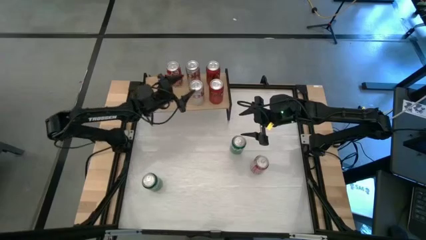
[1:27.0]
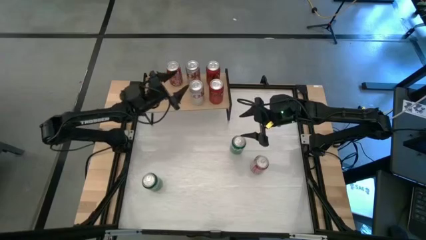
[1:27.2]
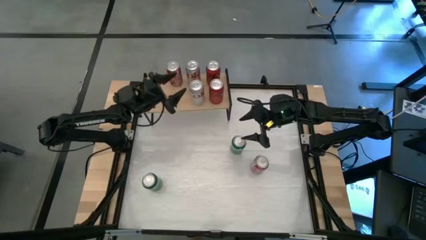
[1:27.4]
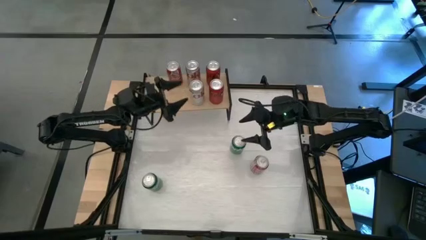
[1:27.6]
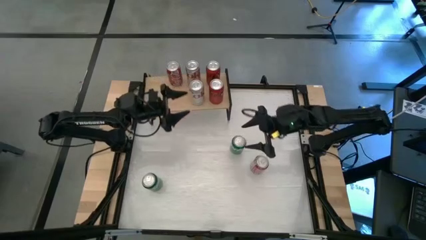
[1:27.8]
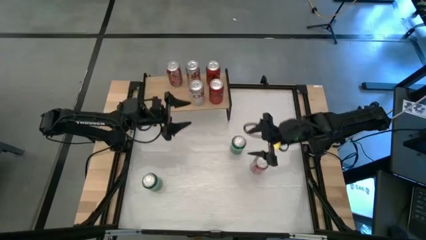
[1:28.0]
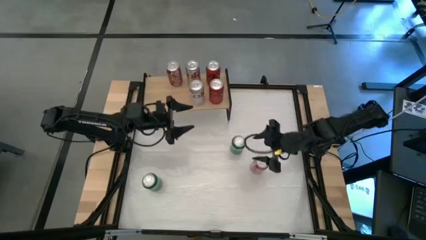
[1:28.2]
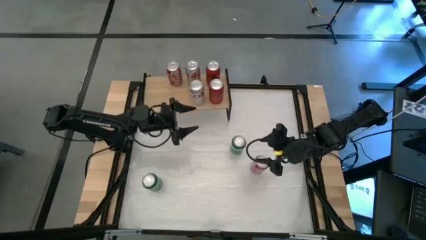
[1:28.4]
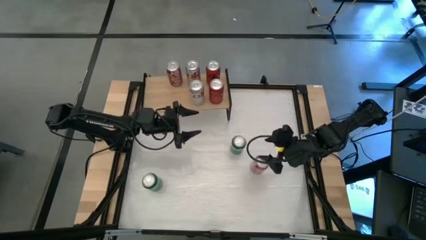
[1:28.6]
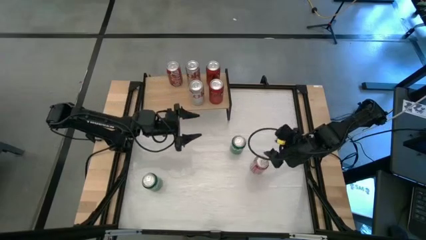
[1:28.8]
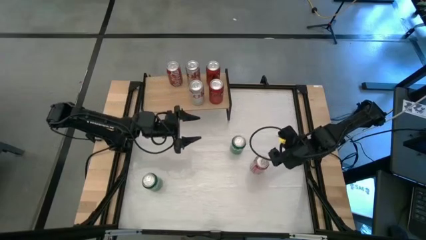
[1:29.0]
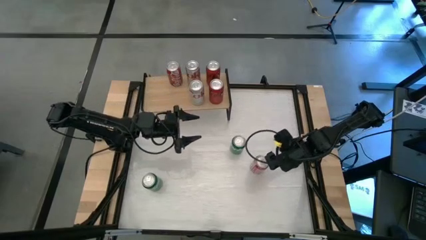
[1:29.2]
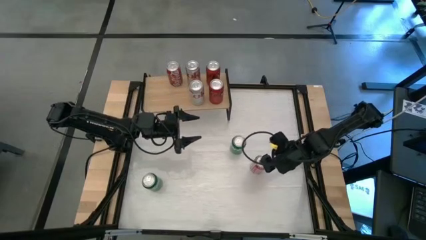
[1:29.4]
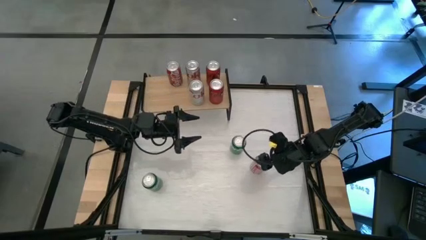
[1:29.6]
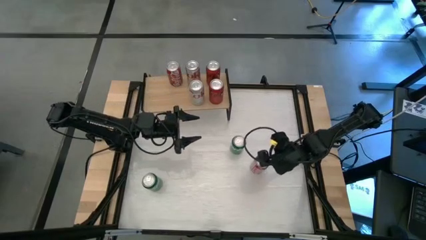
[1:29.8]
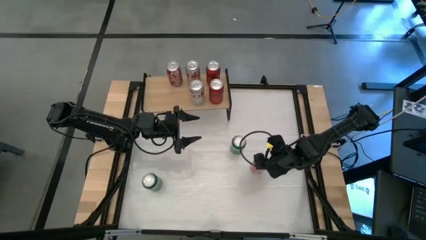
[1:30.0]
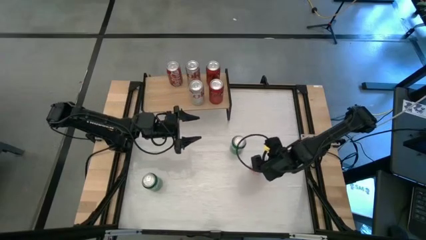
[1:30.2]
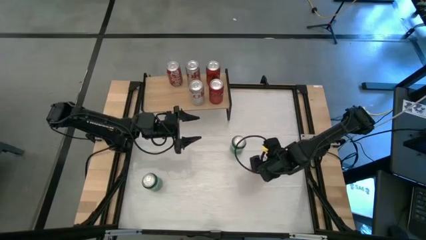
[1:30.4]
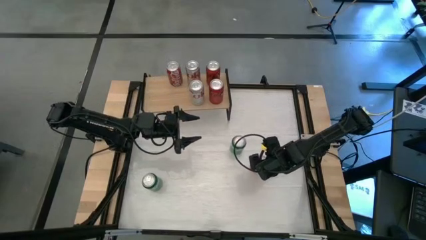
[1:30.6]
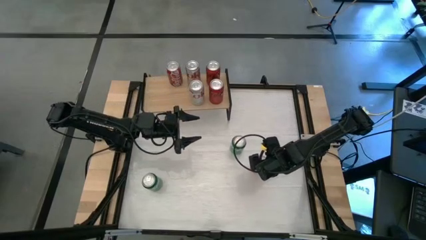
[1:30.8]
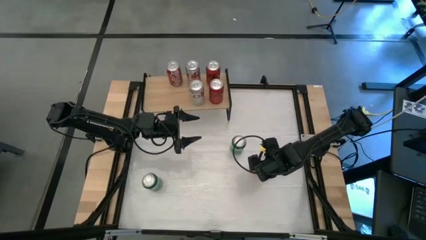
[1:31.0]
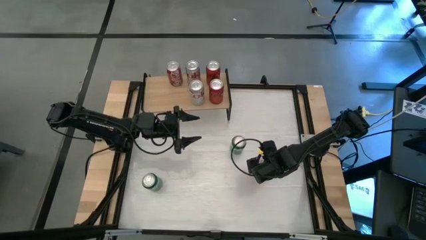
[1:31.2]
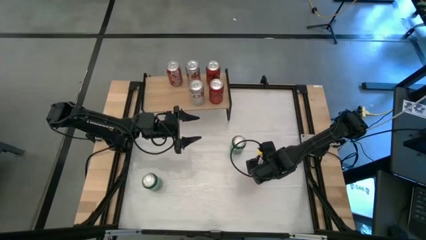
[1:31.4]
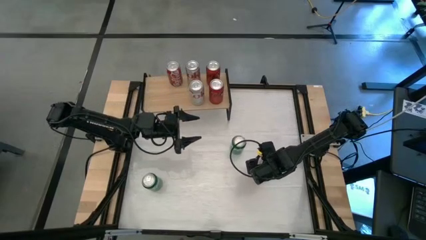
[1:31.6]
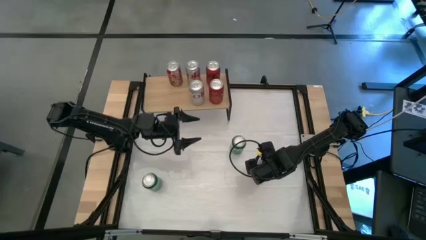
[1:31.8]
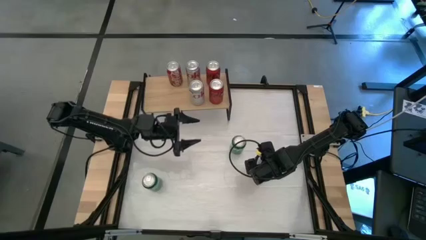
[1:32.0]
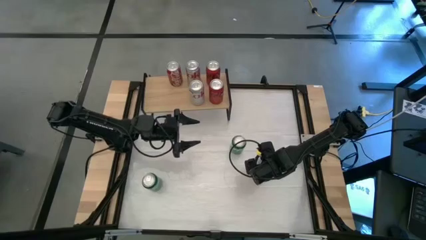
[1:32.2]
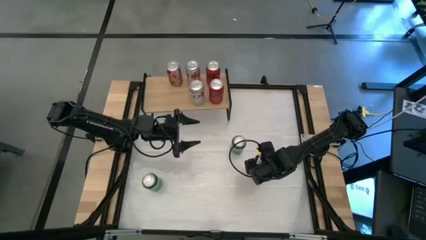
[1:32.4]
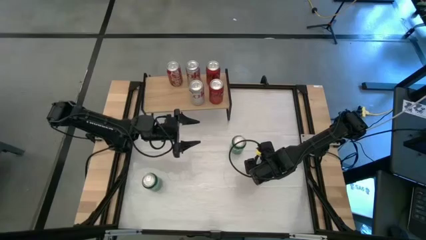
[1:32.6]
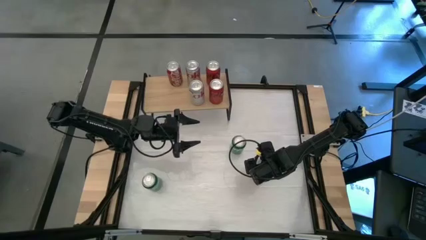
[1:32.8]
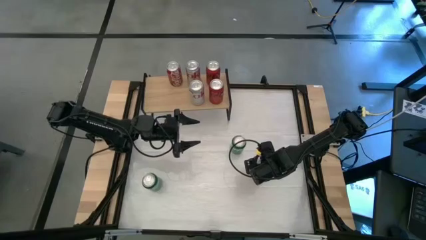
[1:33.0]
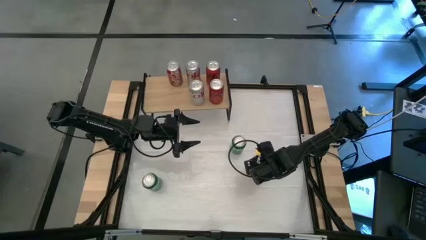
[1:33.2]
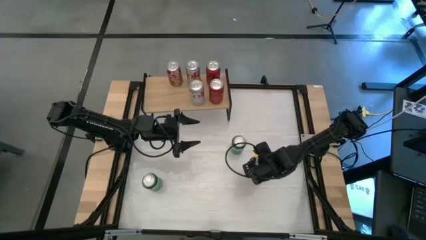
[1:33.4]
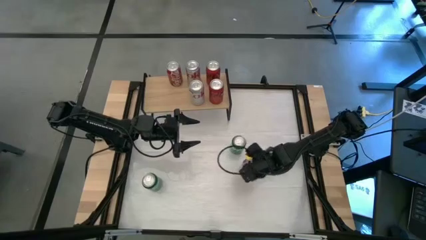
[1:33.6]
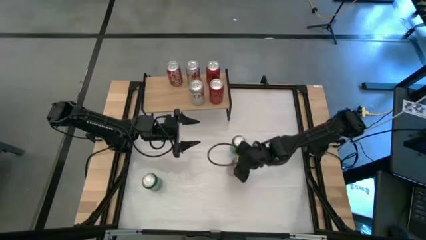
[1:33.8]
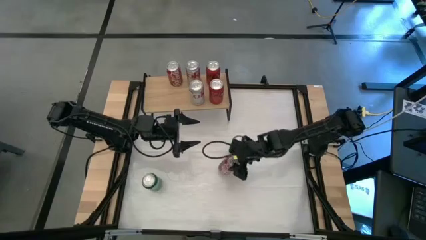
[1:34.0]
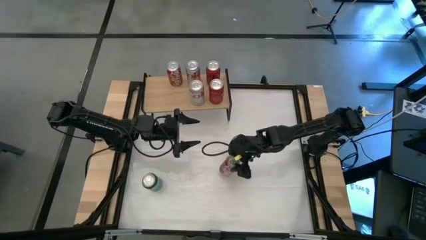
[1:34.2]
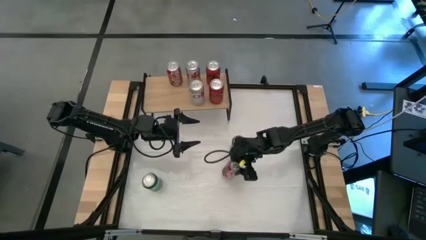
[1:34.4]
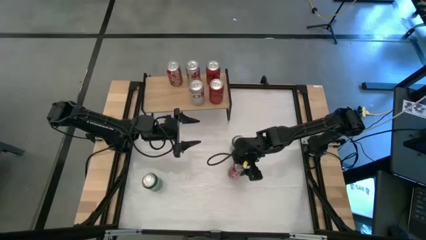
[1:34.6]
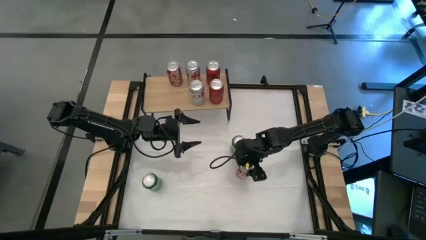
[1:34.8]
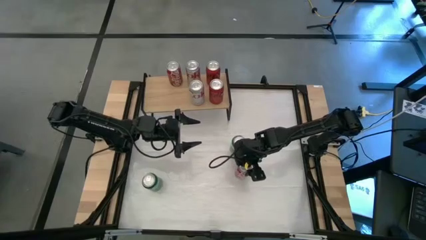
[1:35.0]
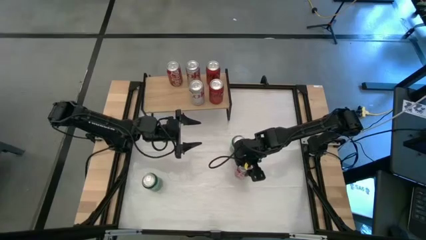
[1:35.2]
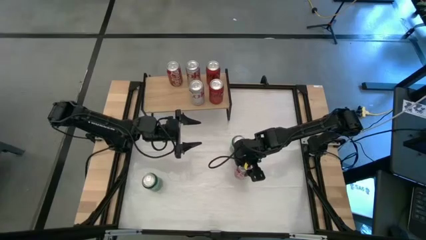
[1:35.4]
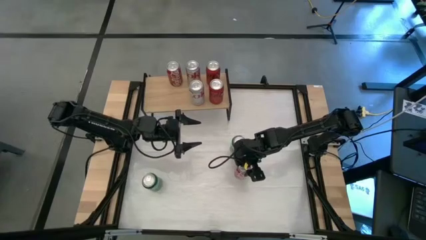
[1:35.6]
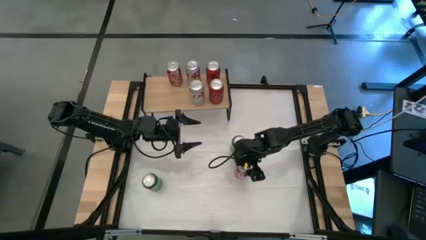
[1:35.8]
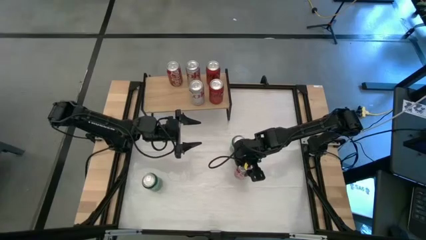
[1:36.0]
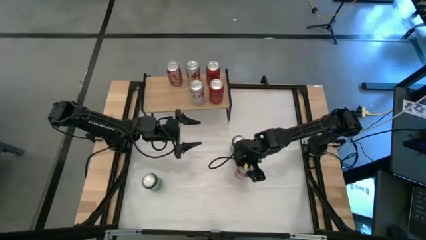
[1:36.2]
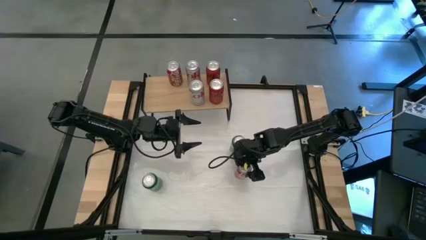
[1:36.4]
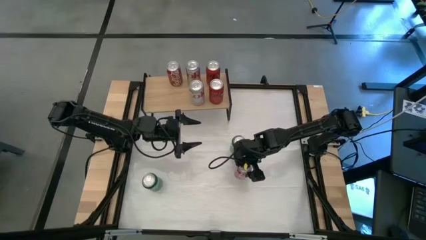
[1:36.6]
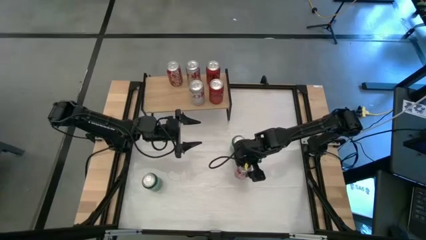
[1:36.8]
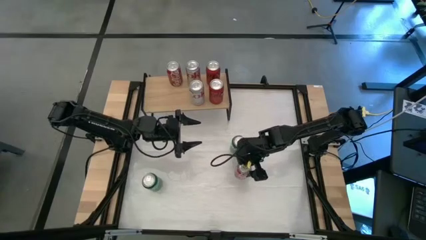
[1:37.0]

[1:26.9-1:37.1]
Task: Place canned beverage on shelf
Move the red white soda can to the center of the table

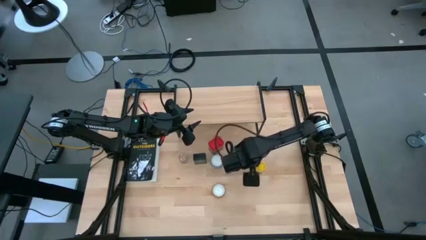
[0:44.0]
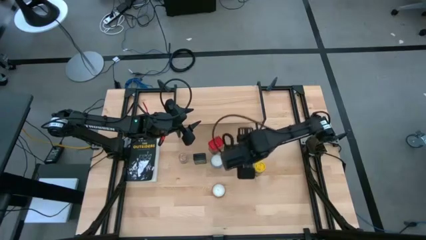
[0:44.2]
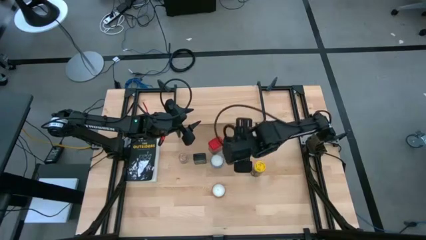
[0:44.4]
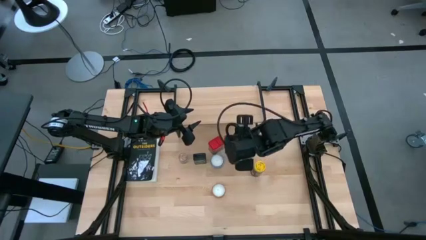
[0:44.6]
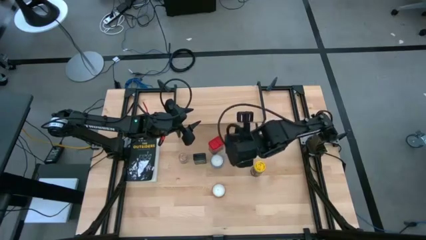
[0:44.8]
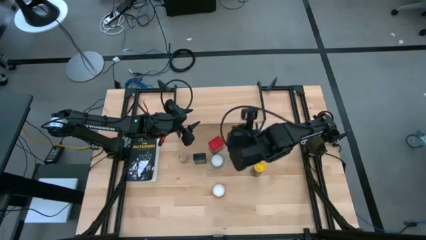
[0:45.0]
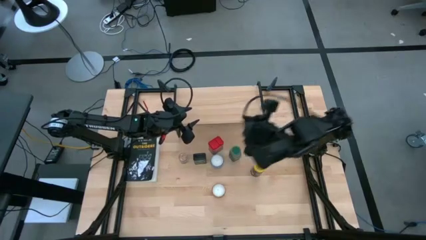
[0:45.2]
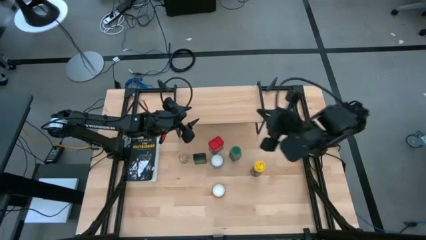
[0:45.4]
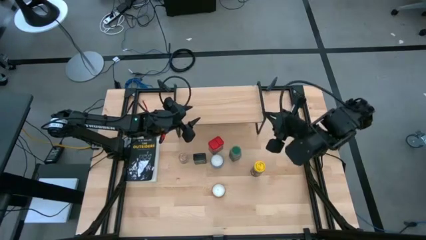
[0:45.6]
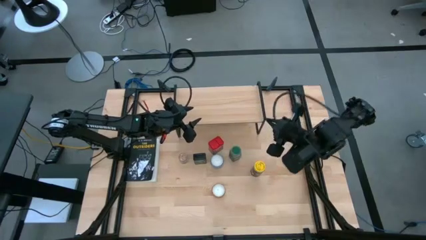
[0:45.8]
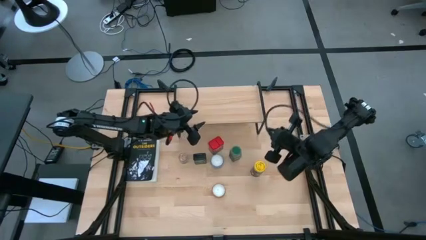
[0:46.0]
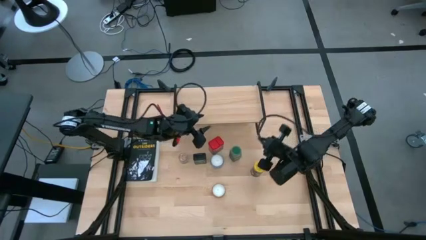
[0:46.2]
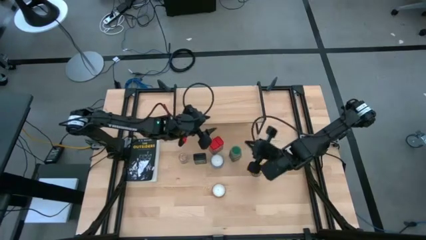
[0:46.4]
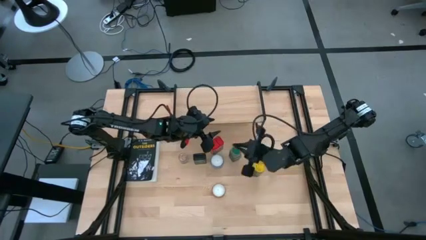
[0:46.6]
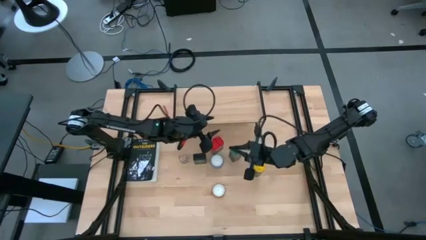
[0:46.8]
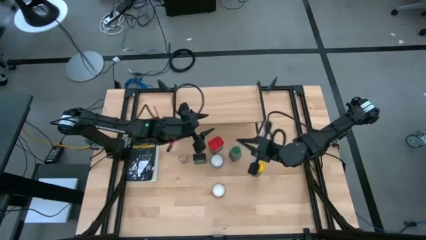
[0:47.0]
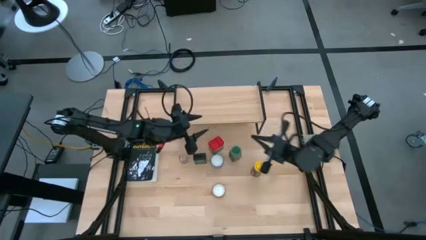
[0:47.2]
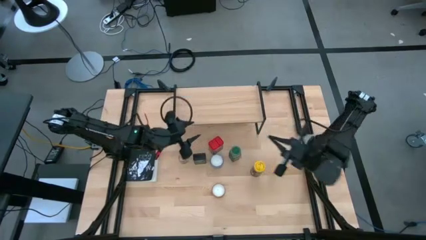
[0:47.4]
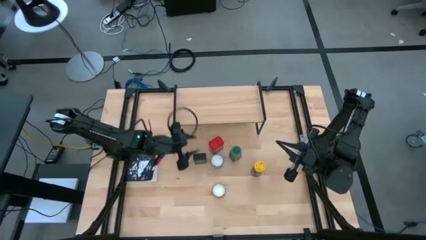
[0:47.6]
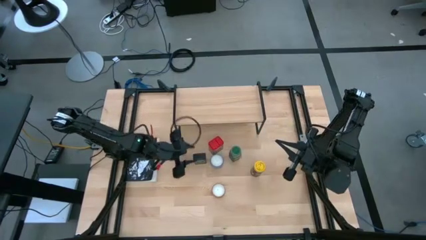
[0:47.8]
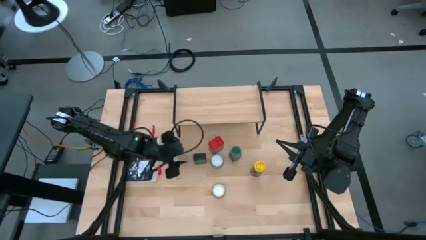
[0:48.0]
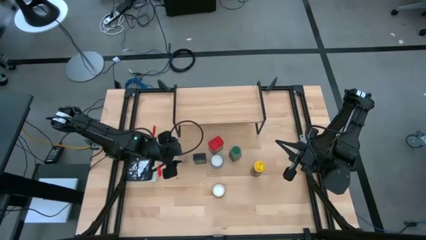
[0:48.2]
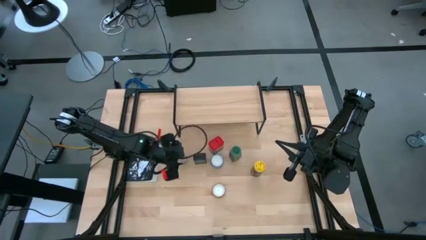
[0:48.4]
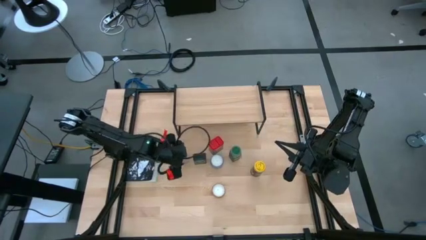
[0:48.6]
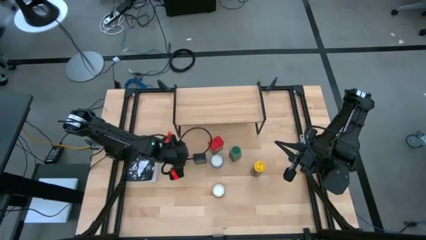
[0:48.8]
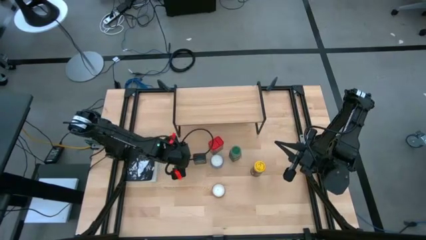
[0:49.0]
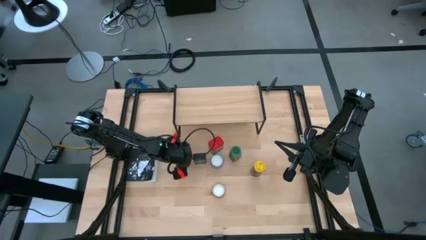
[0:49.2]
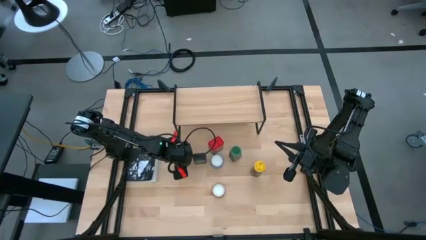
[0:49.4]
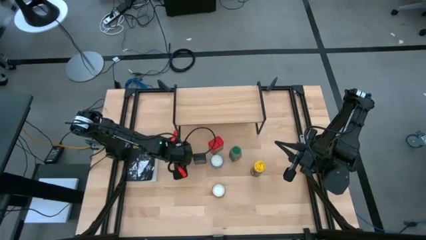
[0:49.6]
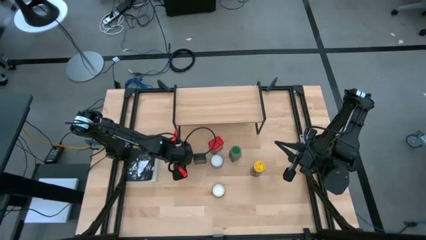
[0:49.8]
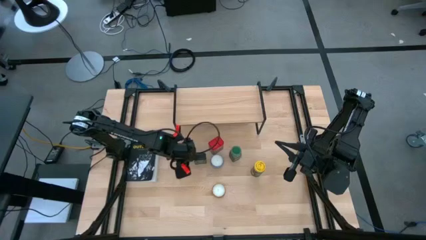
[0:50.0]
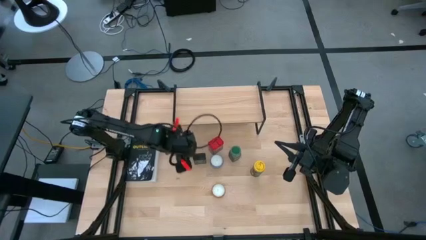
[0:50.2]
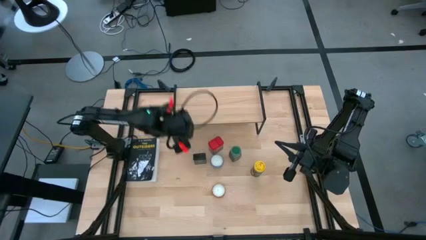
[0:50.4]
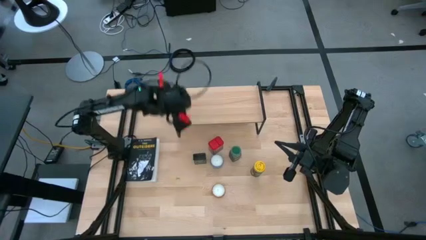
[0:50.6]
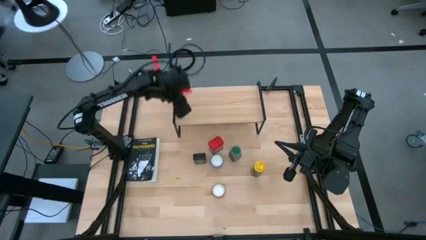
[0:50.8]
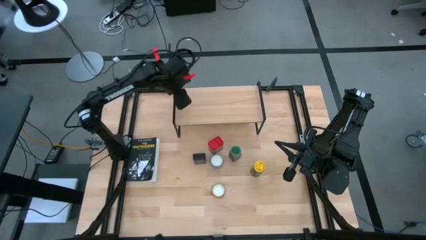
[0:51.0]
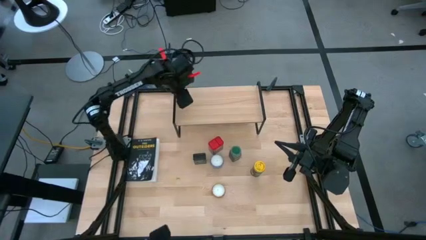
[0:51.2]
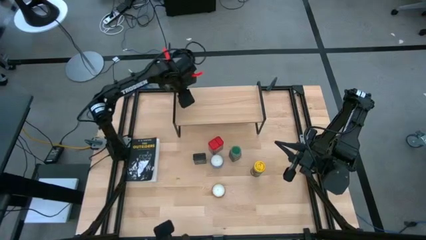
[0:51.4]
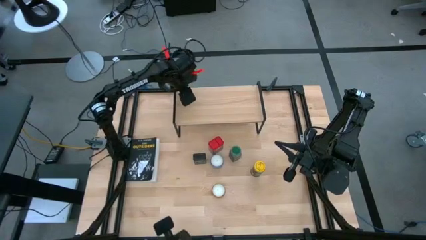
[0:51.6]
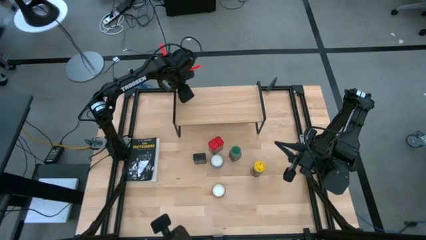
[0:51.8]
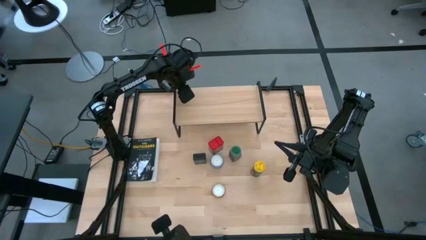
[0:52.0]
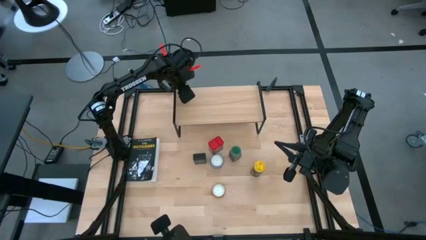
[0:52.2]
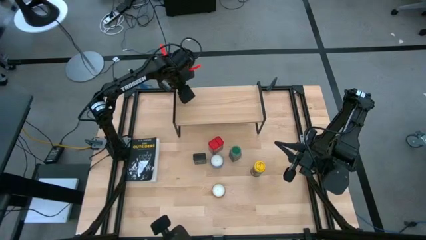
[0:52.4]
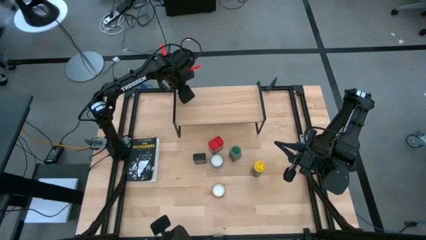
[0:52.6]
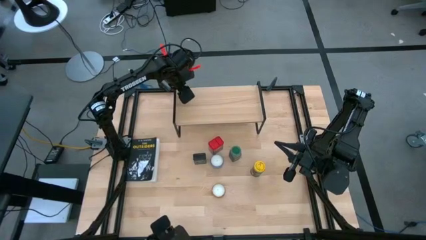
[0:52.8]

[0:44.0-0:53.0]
Task: Shelf spices
Put the brown seasoning bottle on the shelf
